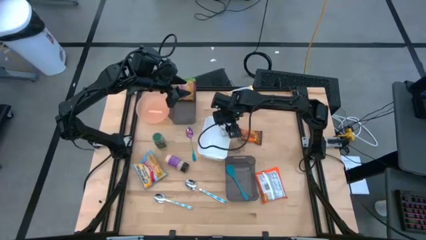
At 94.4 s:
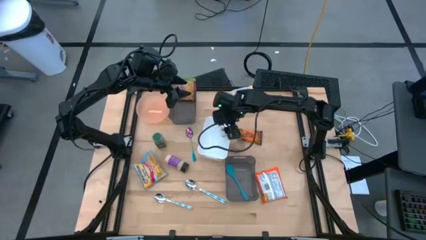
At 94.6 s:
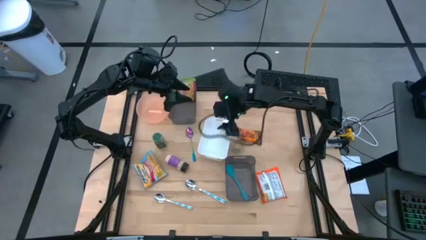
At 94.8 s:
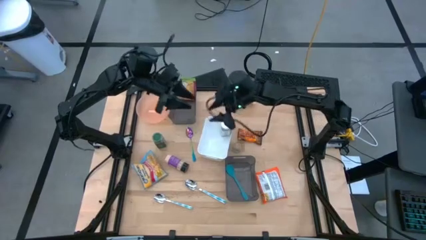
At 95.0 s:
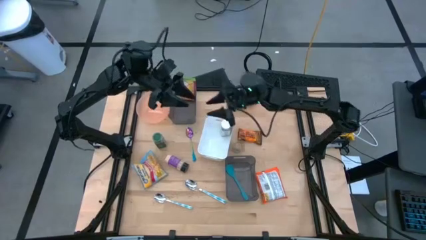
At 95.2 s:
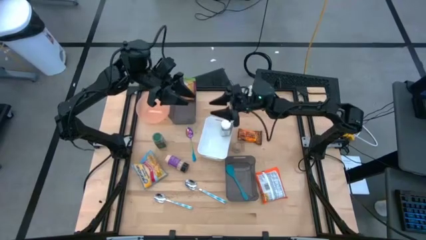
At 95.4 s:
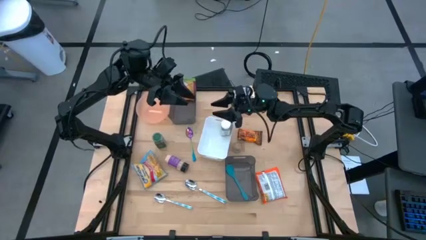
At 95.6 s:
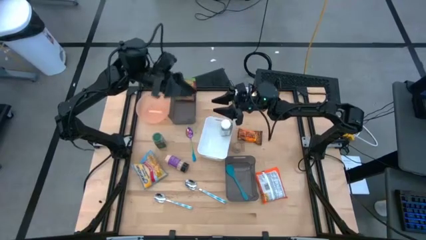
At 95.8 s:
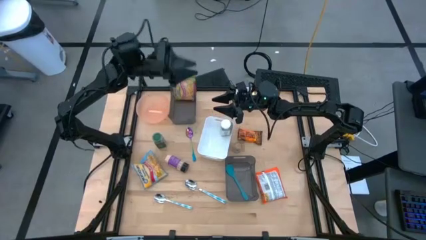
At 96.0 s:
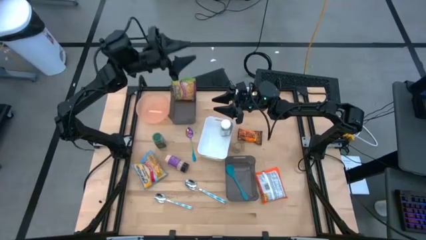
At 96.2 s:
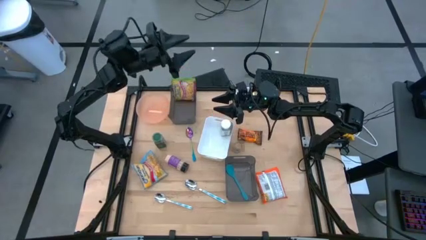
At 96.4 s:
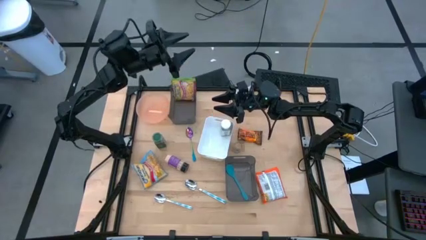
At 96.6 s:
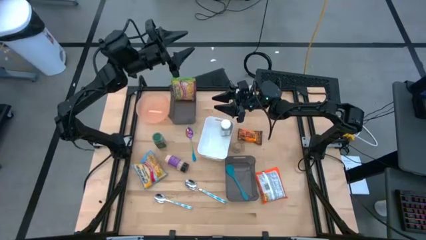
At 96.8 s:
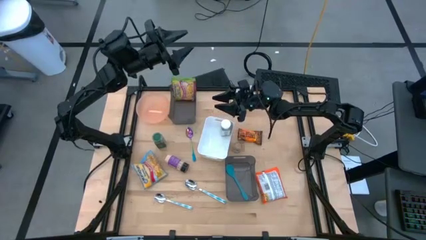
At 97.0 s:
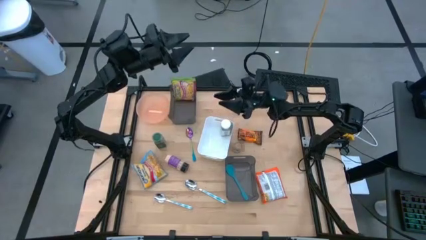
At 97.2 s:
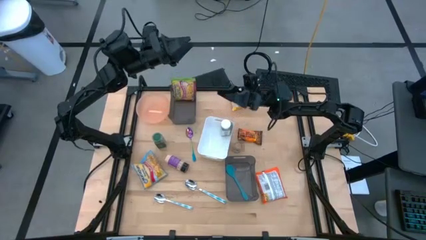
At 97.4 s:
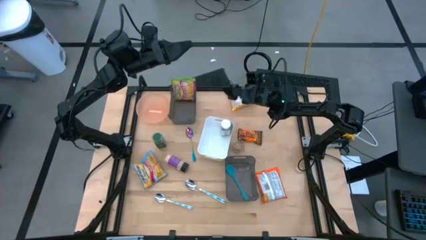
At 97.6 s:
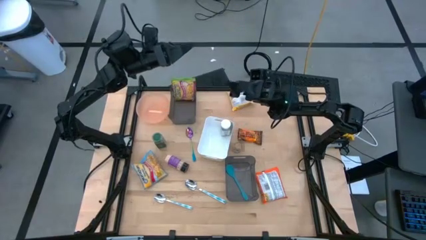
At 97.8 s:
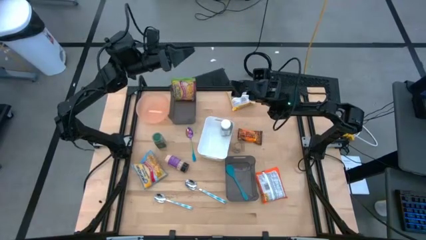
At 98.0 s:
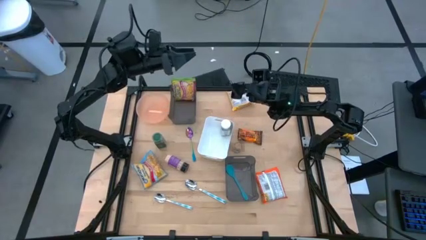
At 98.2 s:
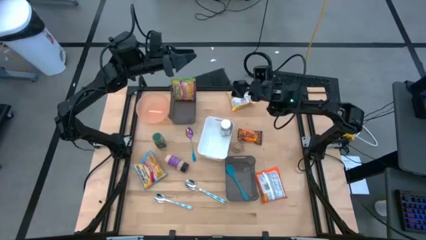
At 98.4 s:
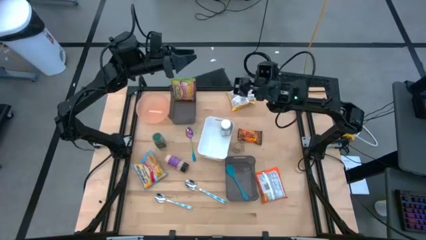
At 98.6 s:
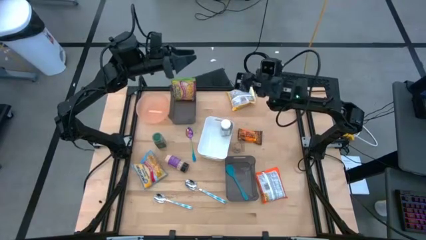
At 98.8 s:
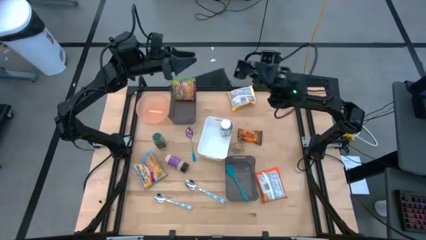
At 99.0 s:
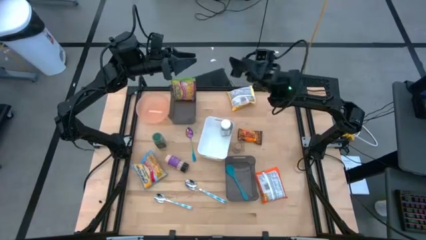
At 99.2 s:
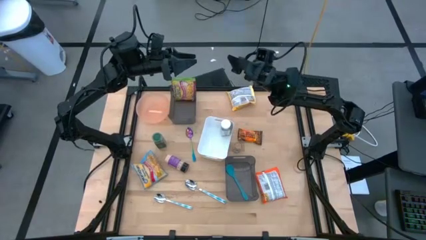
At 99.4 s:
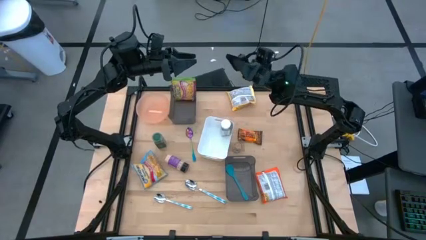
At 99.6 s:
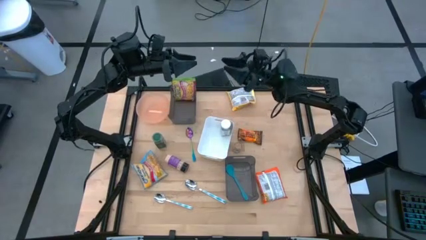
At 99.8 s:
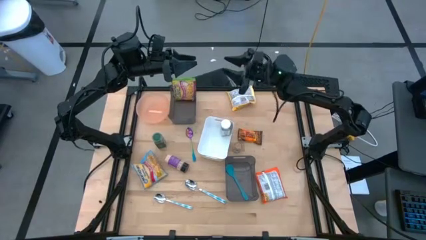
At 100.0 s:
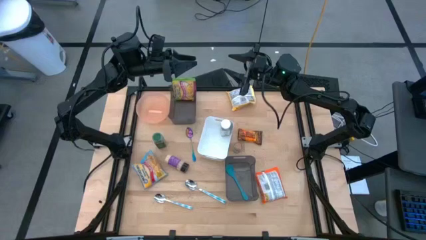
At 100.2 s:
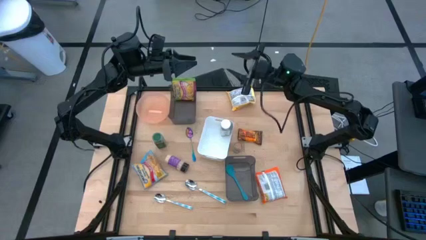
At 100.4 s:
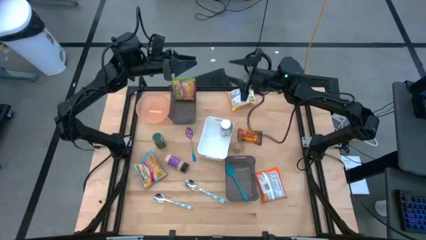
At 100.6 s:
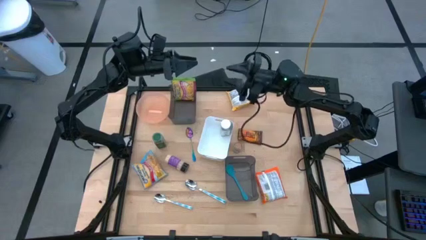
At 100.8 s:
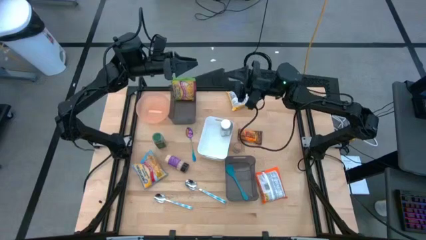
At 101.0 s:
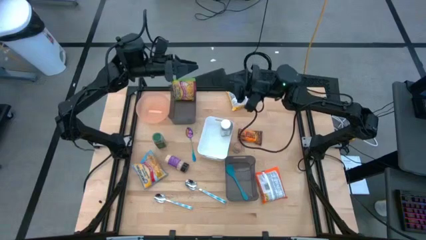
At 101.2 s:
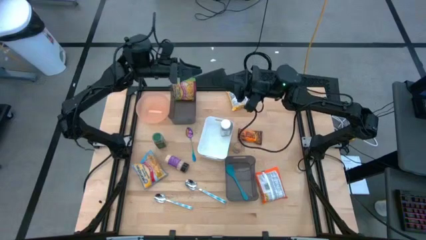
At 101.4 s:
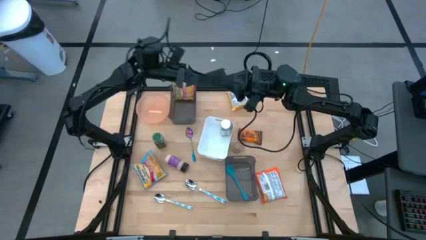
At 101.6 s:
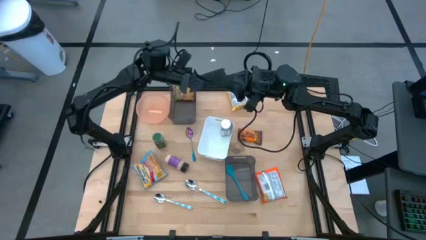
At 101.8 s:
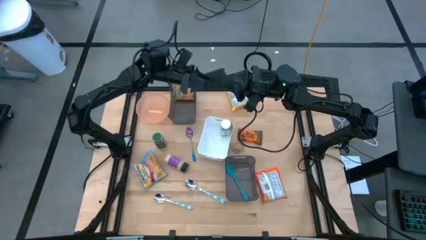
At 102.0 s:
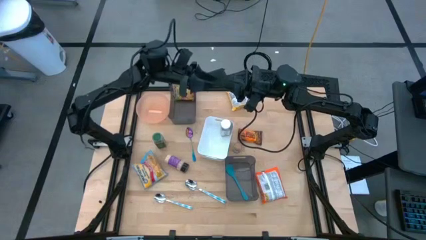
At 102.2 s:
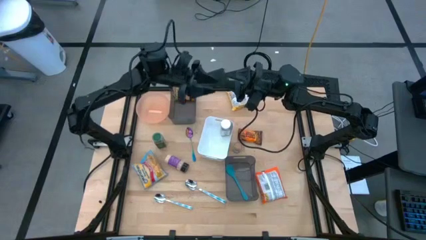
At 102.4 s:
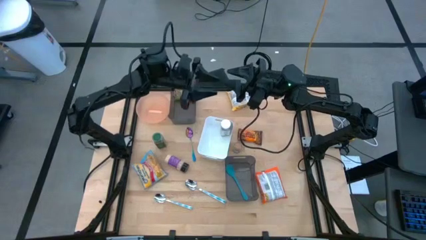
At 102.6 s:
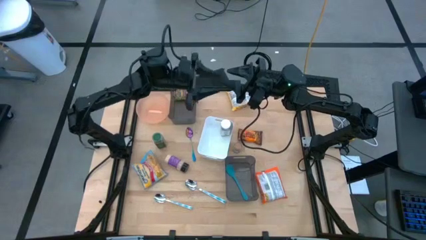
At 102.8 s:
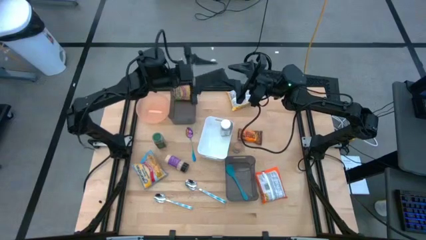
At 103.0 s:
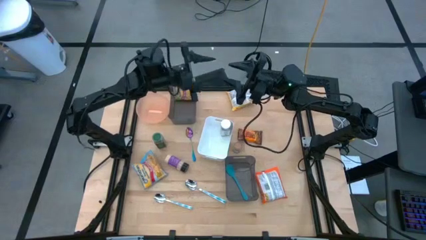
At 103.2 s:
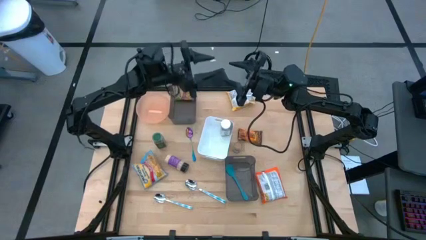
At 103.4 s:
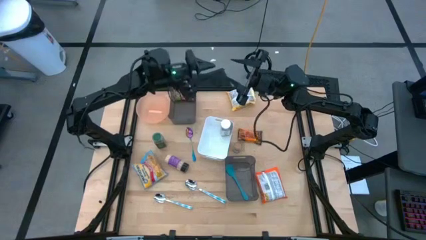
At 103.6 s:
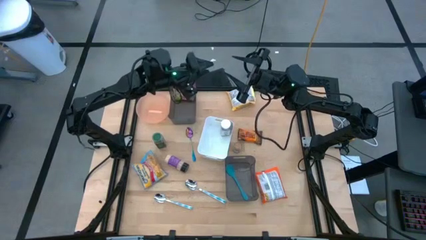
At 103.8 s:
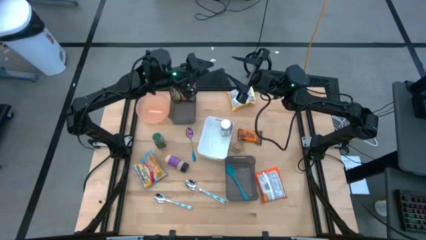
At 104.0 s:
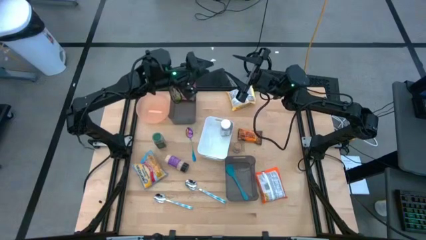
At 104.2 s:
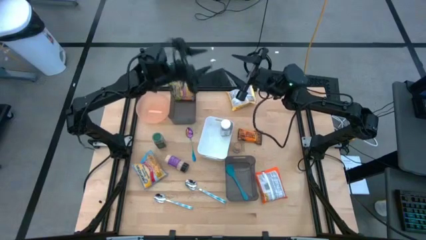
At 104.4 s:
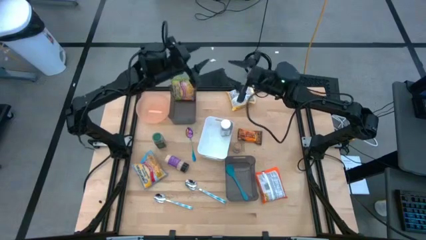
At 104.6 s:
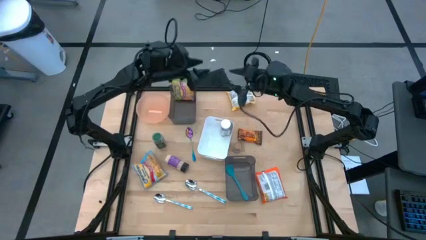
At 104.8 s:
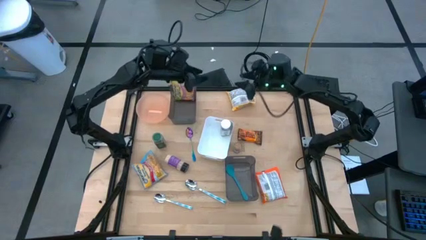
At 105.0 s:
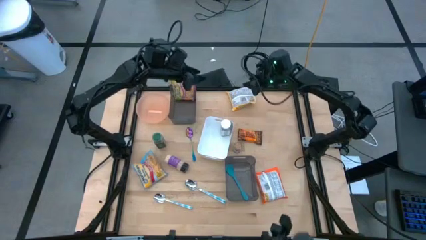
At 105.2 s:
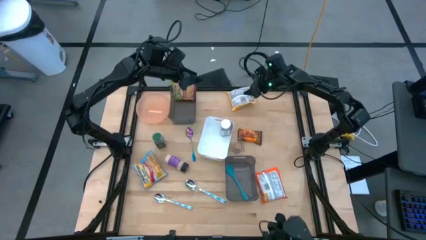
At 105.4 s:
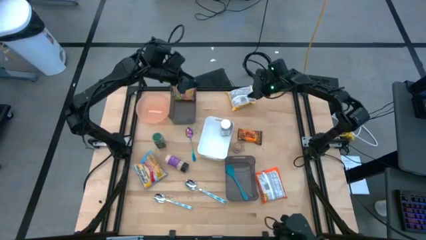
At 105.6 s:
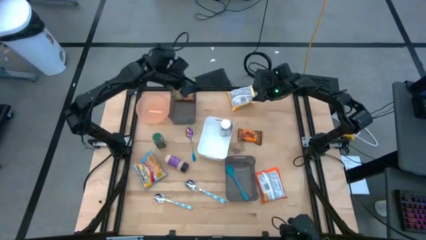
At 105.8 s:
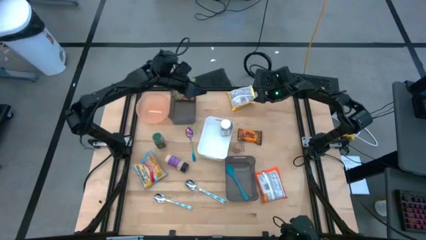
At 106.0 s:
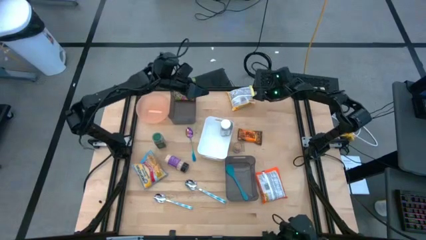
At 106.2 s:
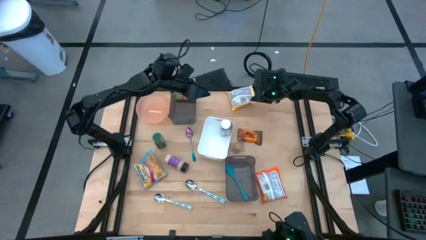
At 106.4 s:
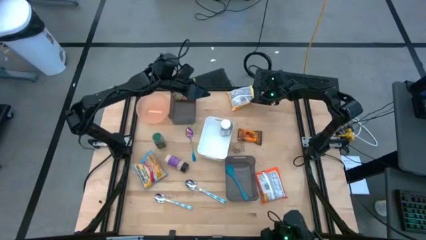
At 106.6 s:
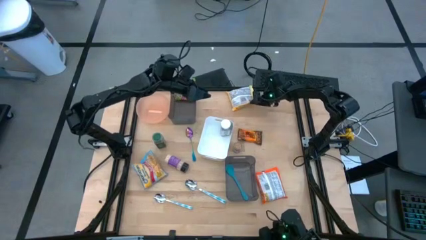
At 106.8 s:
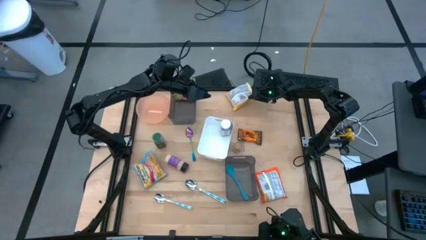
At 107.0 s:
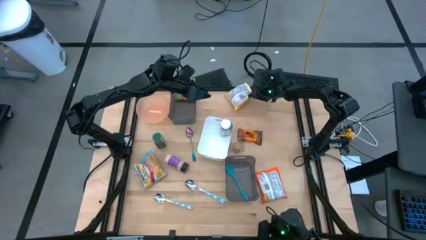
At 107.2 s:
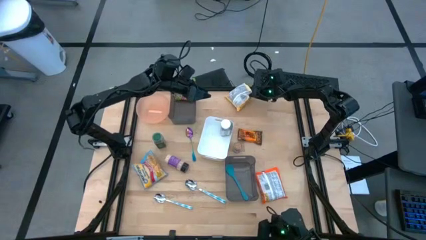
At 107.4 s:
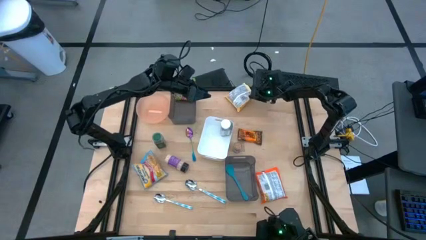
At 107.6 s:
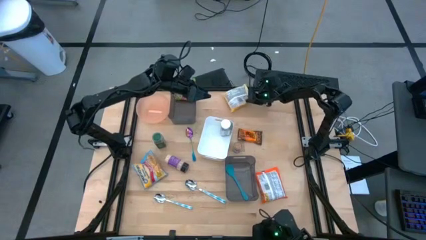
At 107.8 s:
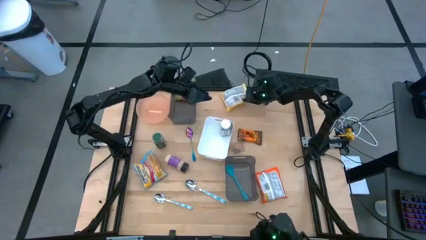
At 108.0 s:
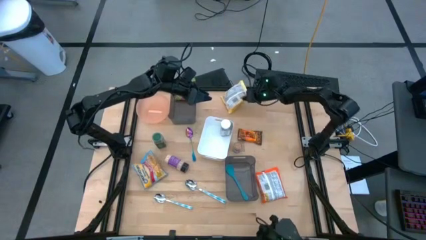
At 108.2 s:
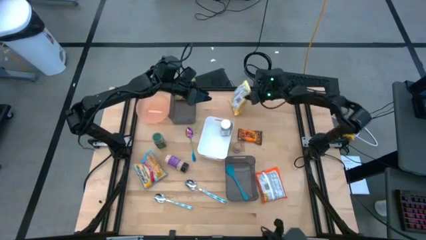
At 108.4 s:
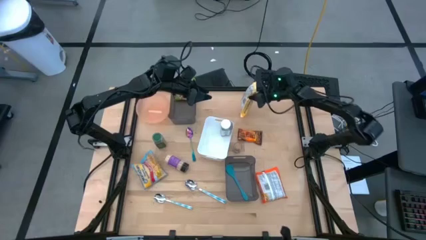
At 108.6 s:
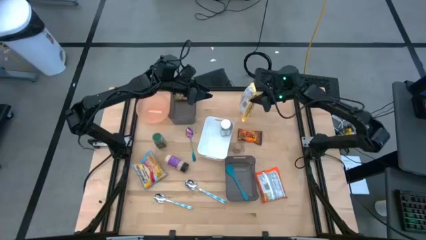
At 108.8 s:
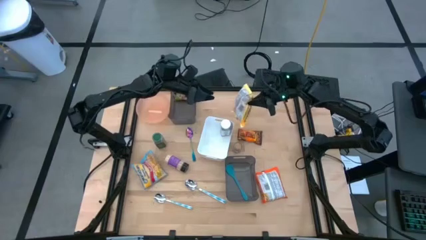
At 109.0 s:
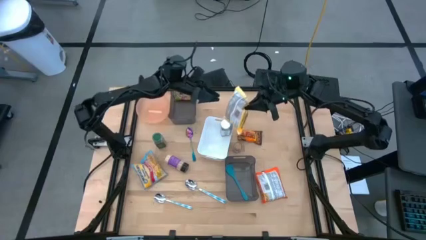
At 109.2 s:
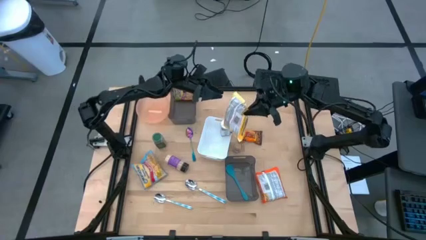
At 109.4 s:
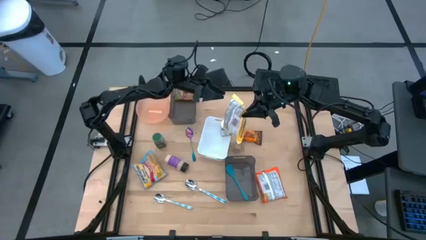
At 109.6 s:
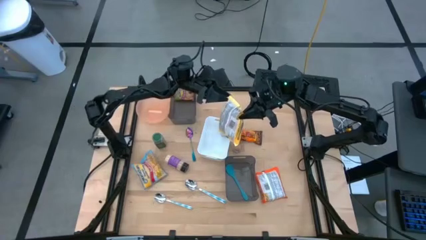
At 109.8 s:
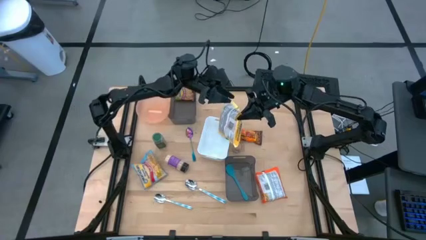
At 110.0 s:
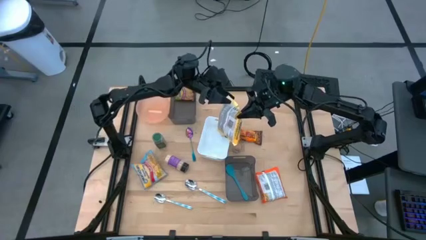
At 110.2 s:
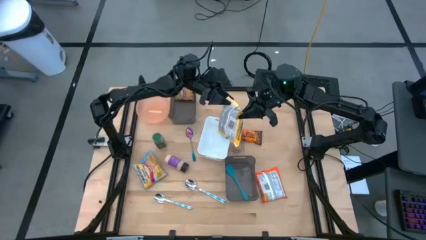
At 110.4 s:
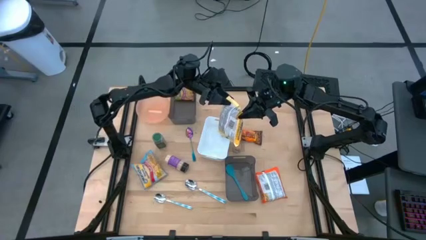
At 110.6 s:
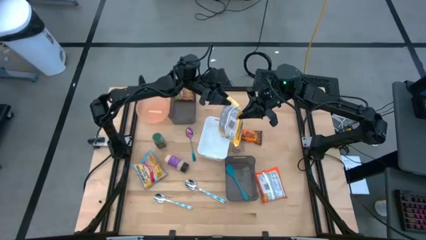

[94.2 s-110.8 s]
Task: Pick & Place Food Item
Put the yellow noodle pack into the top black bin
